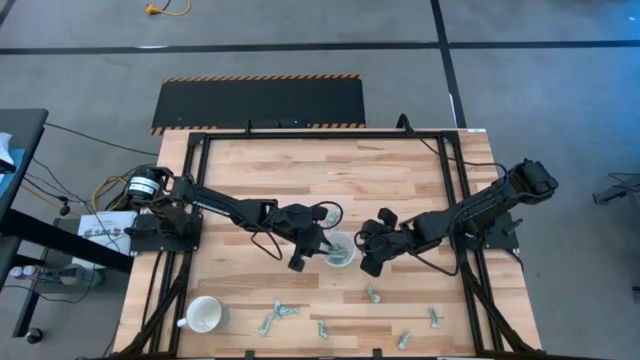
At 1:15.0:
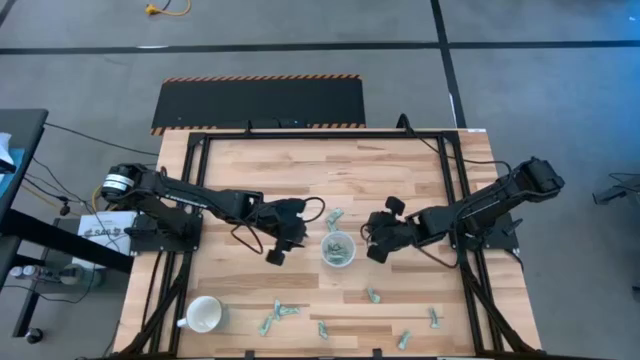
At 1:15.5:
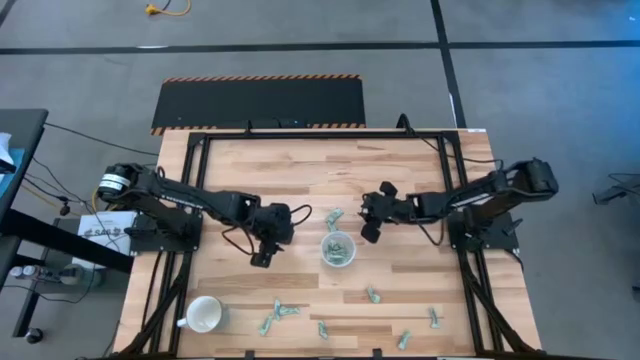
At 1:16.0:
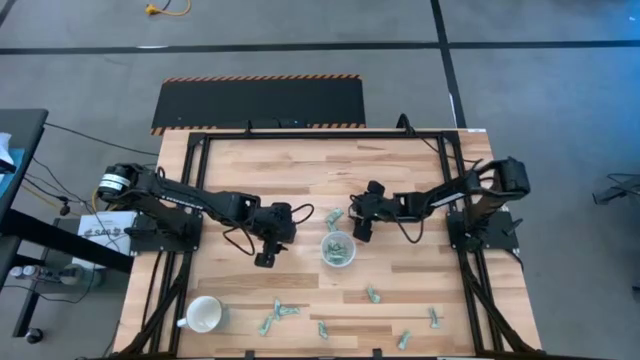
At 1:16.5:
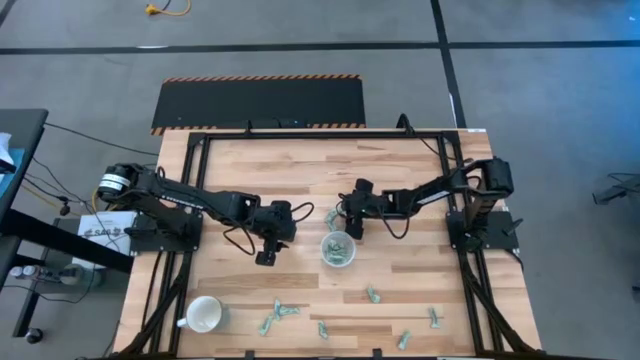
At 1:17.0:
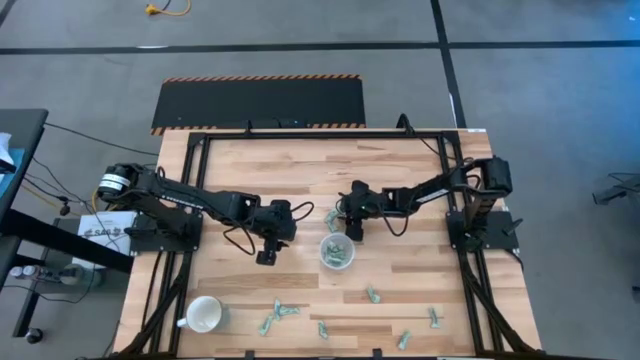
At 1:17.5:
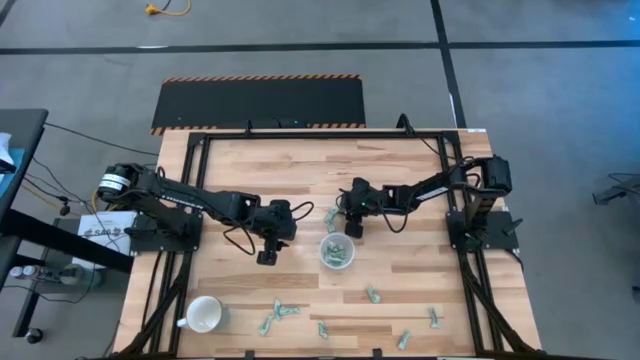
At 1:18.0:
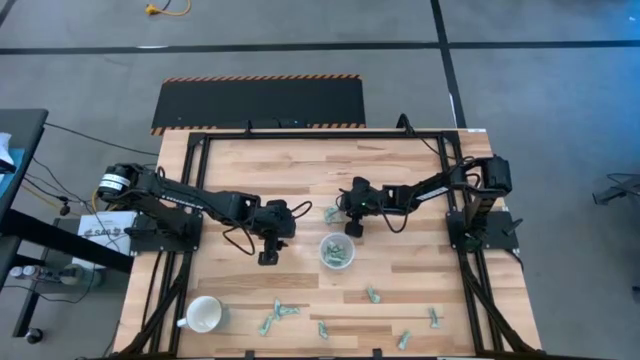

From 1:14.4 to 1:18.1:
Task: Pick and place Stevia / Truvia into bins
Put the stevia packet into the transparent container

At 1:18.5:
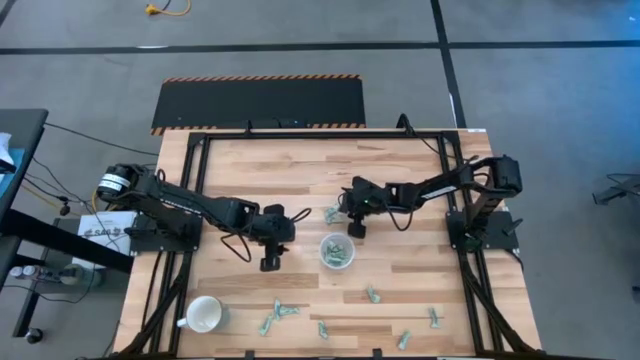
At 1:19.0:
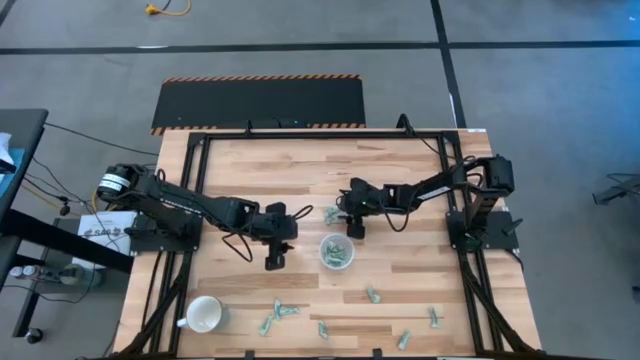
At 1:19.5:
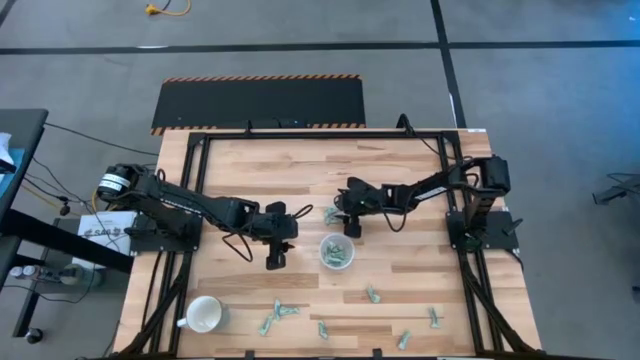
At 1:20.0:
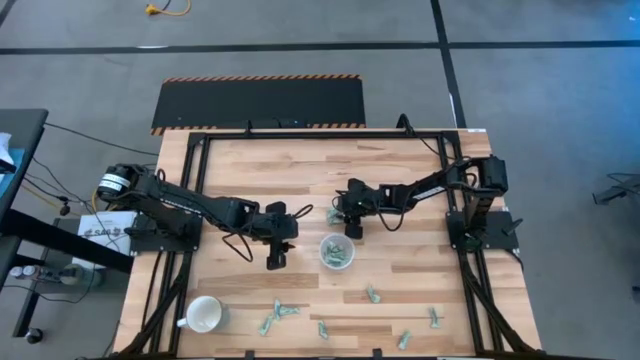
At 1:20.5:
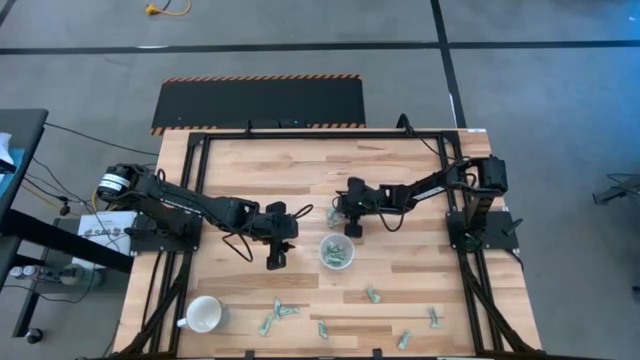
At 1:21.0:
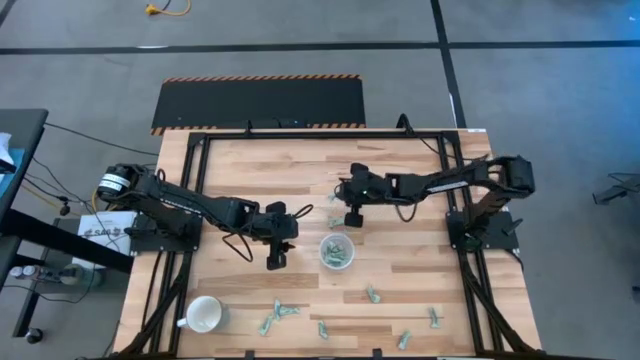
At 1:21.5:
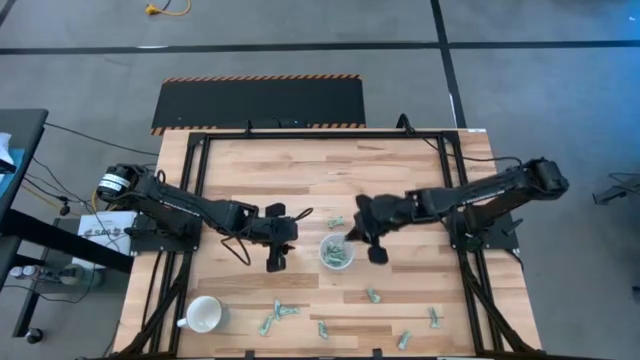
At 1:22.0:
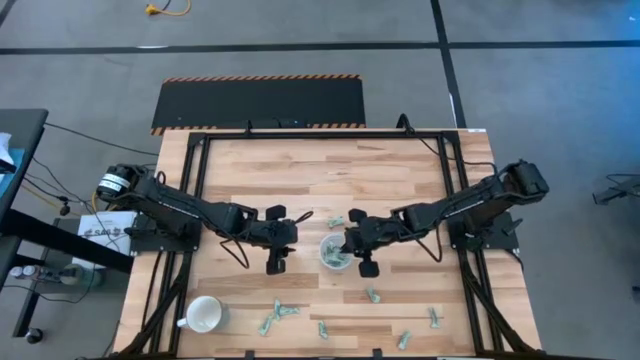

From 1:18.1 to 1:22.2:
Put the stevia packet into the transparent container

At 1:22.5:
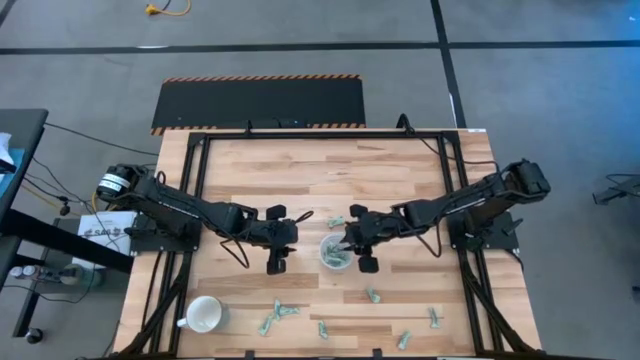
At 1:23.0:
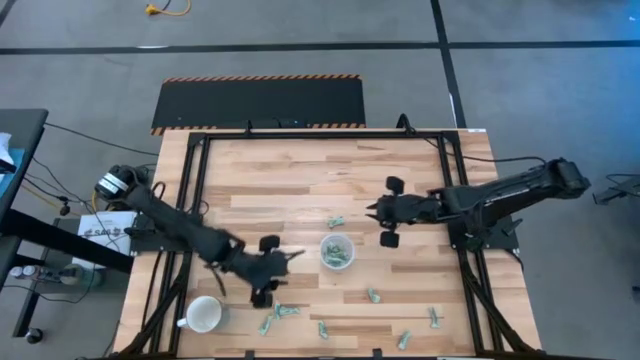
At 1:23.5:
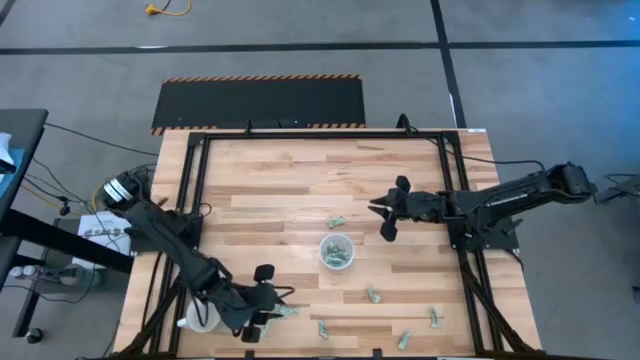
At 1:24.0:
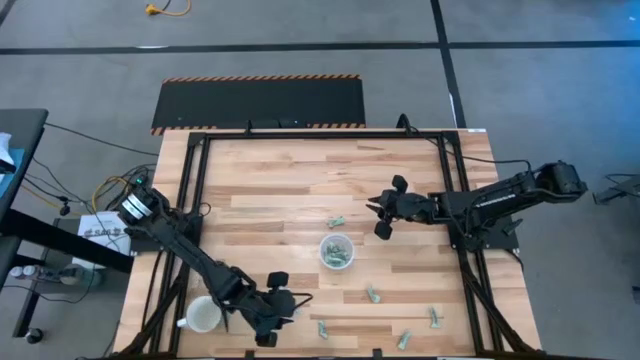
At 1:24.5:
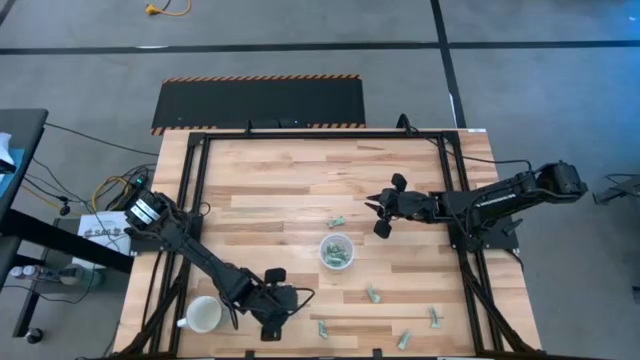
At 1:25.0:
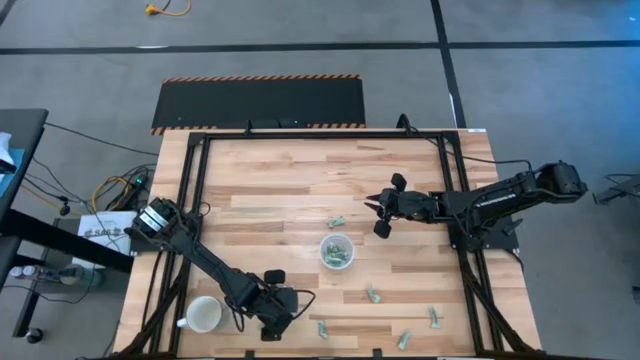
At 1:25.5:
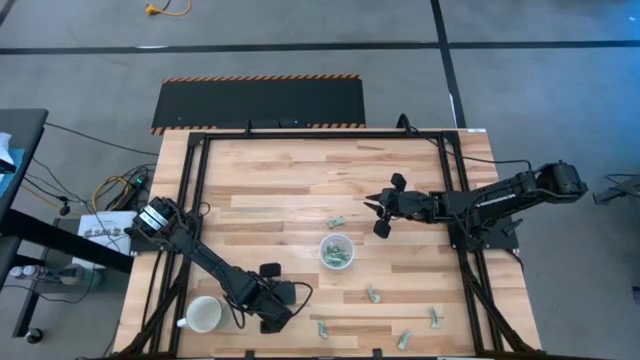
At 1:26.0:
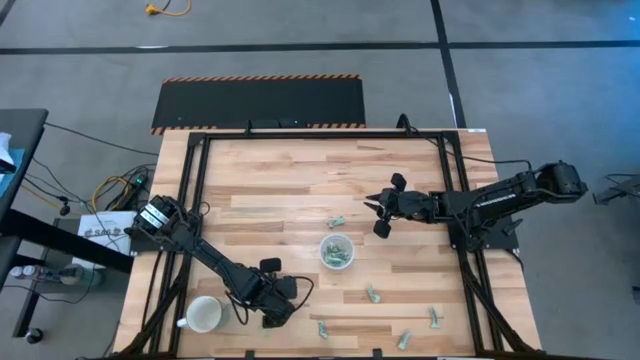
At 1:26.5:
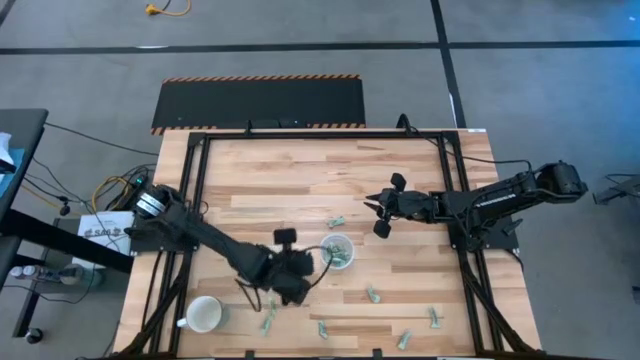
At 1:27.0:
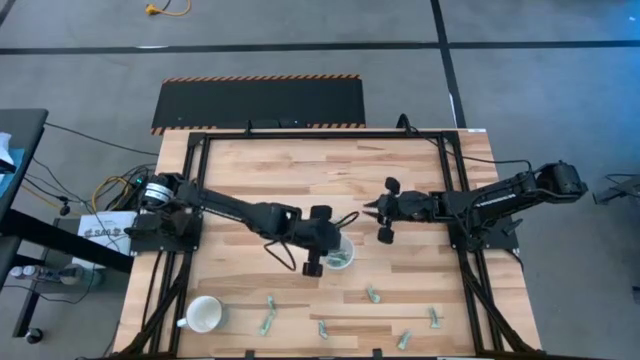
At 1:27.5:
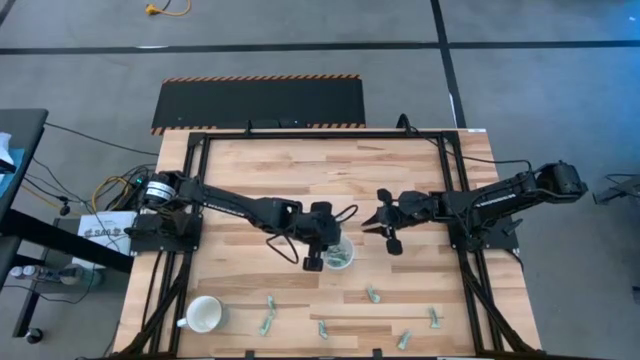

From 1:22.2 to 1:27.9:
Put the stevia packet into the transparent container

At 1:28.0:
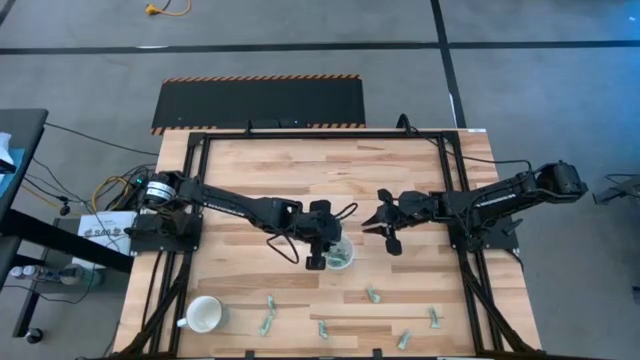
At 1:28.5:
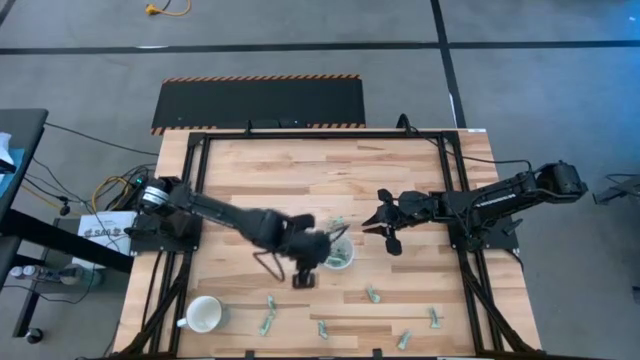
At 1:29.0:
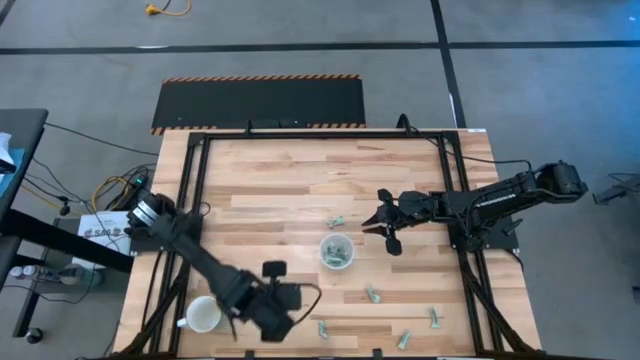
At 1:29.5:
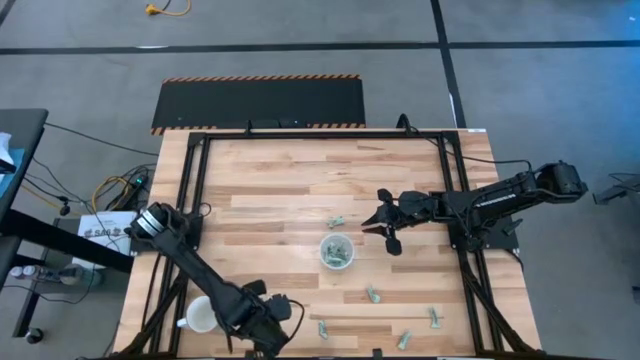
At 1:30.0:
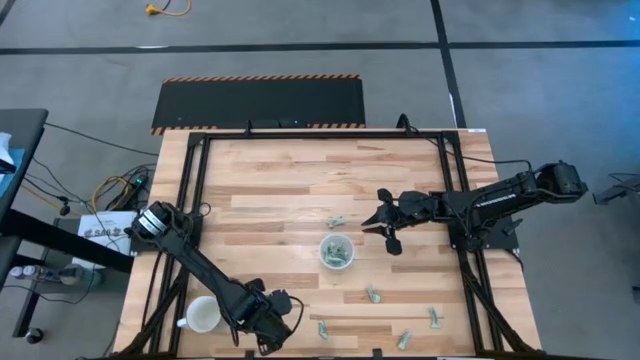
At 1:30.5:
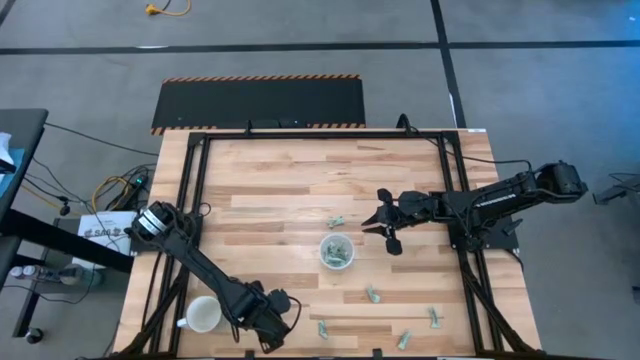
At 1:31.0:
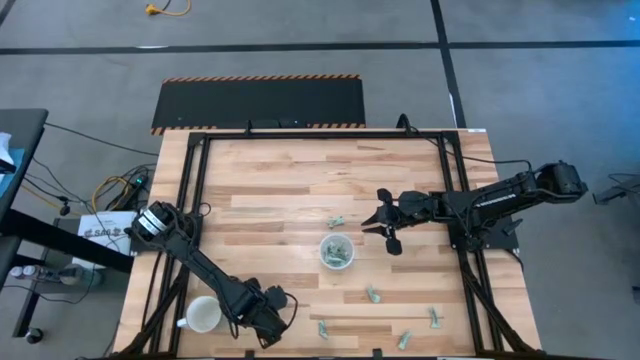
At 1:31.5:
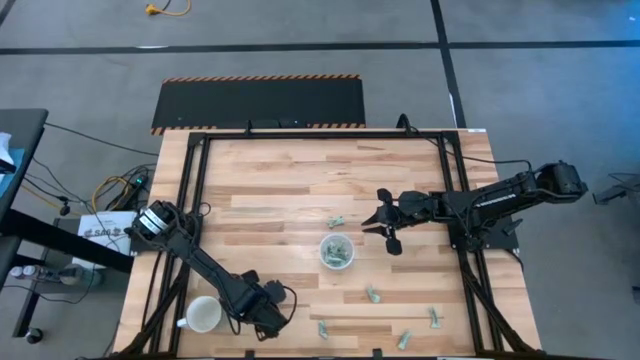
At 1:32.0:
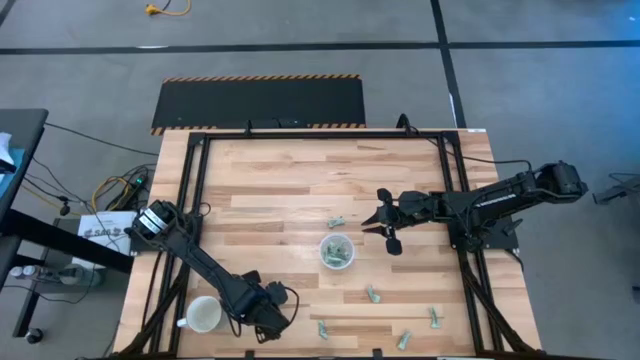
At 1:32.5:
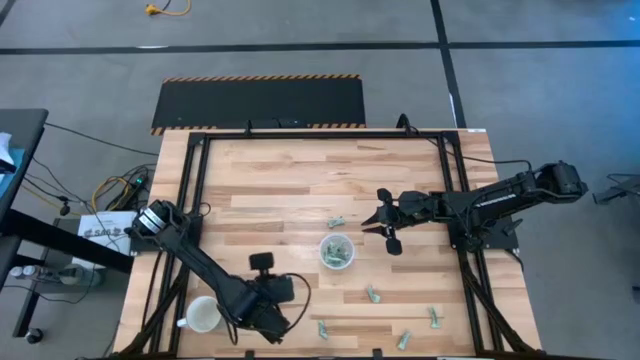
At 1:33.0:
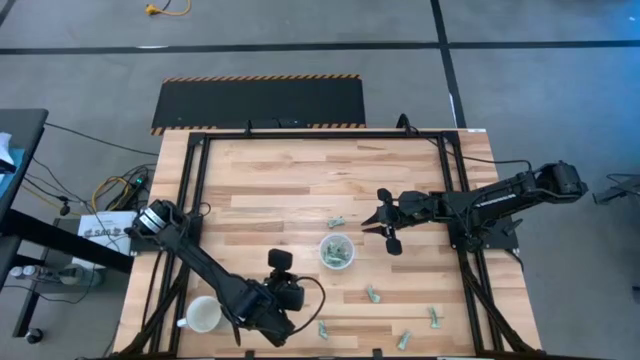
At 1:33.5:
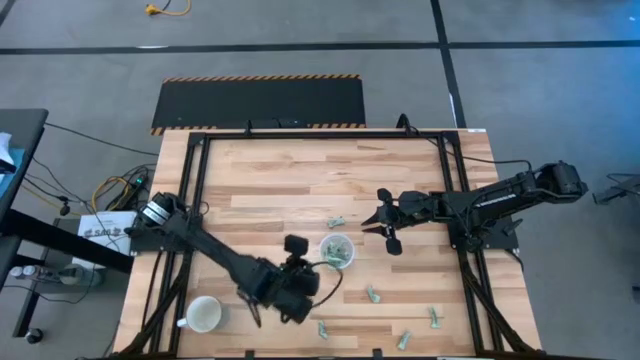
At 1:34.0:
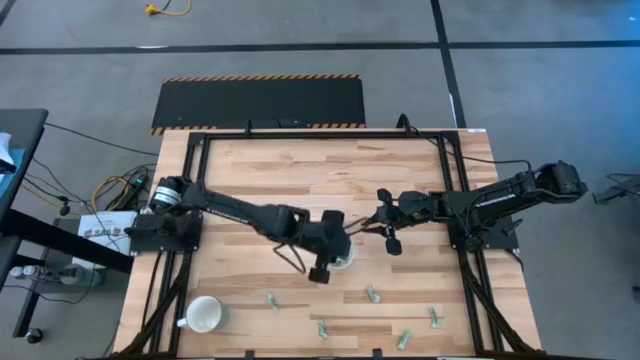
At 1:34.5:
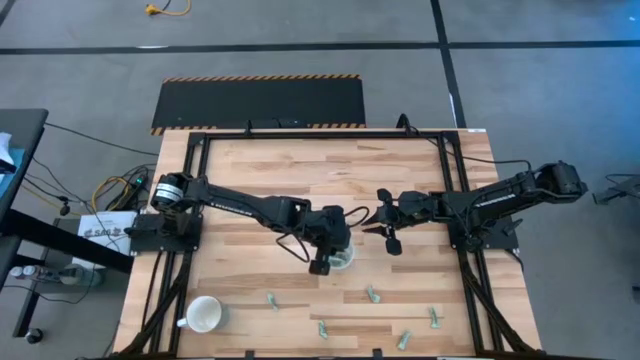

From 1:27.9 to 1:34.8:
Put the stevia packet into the transparent container
